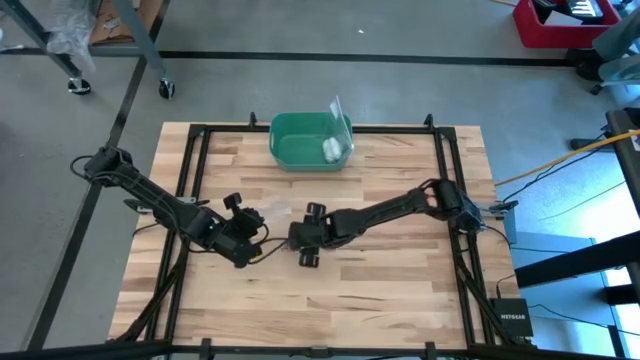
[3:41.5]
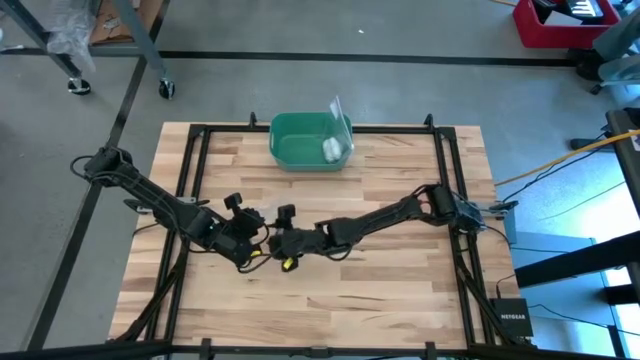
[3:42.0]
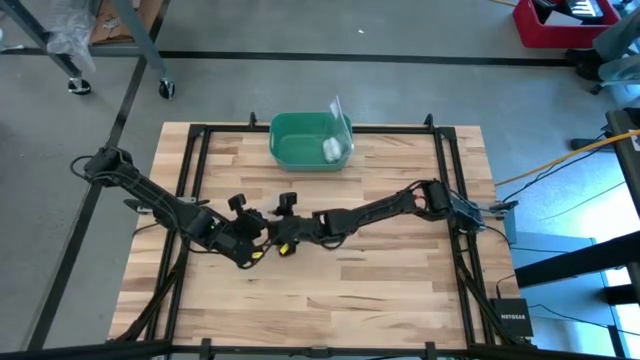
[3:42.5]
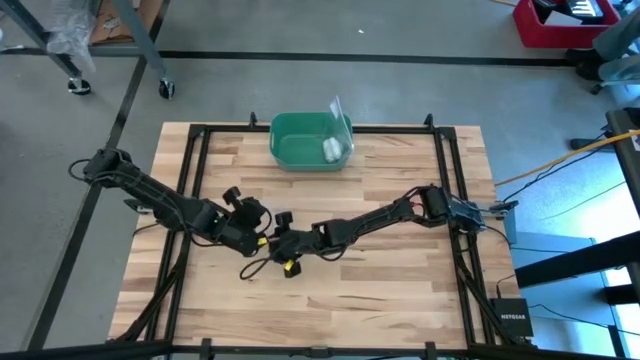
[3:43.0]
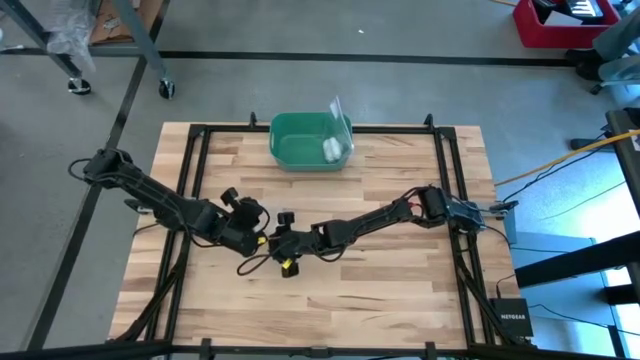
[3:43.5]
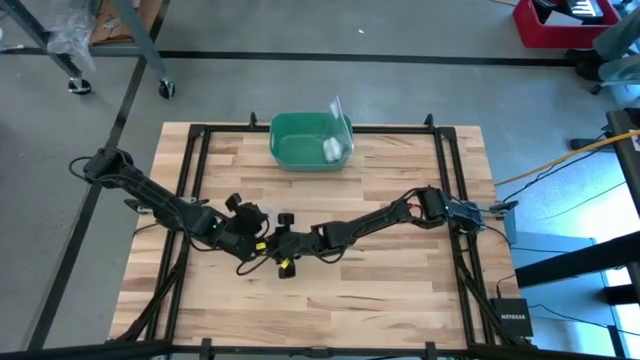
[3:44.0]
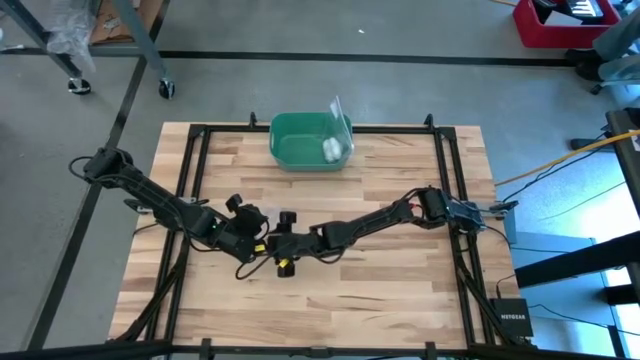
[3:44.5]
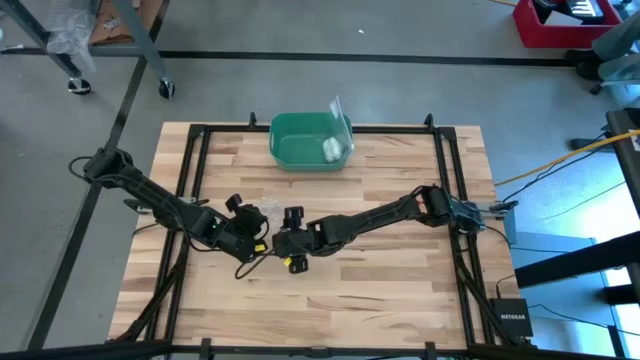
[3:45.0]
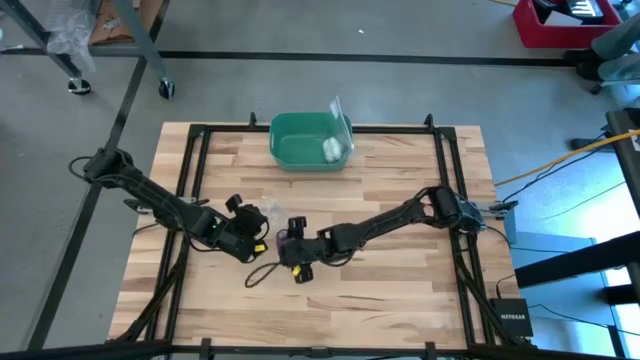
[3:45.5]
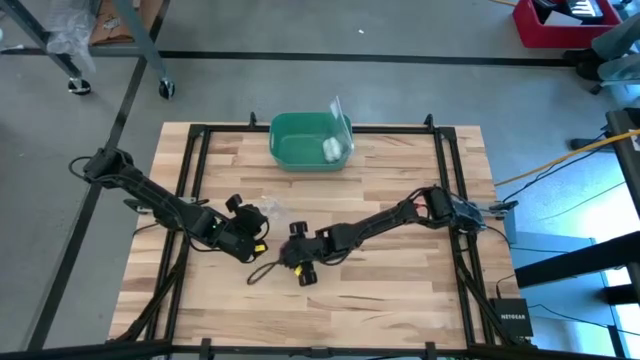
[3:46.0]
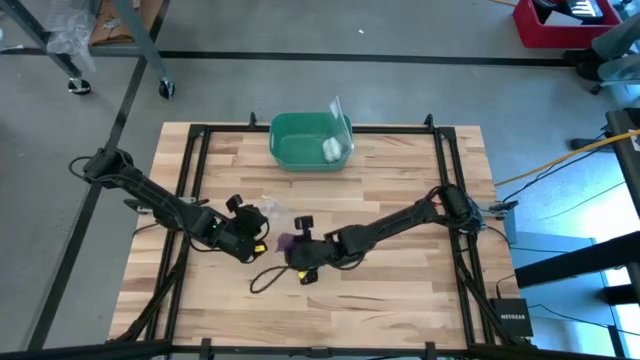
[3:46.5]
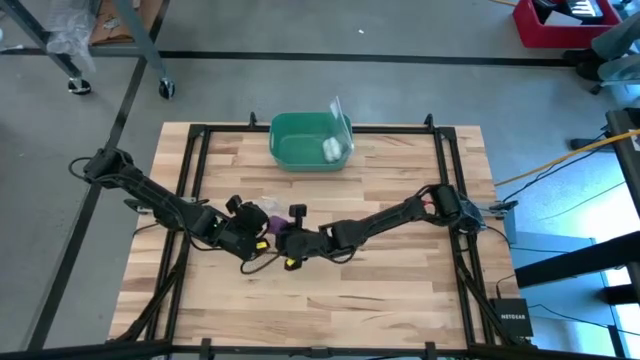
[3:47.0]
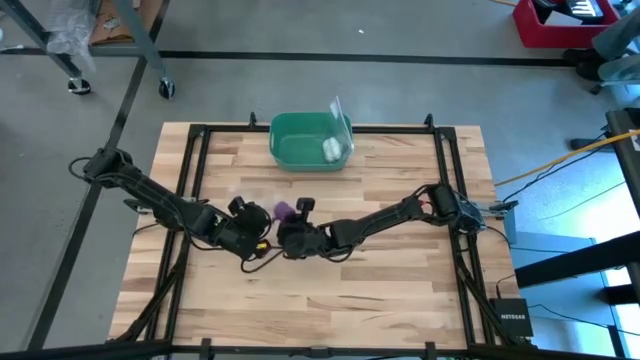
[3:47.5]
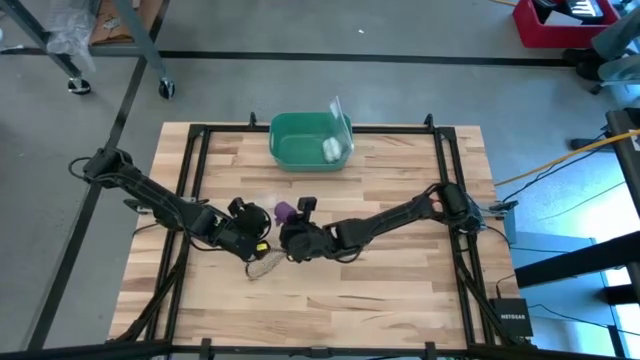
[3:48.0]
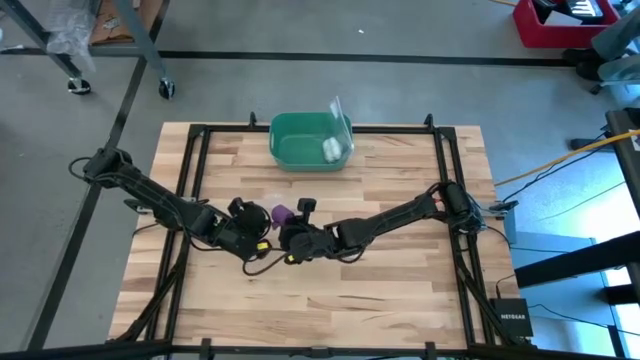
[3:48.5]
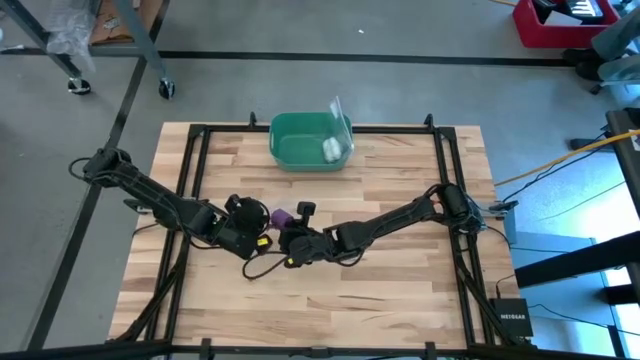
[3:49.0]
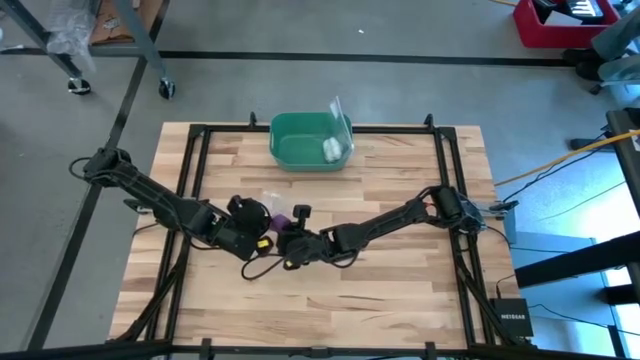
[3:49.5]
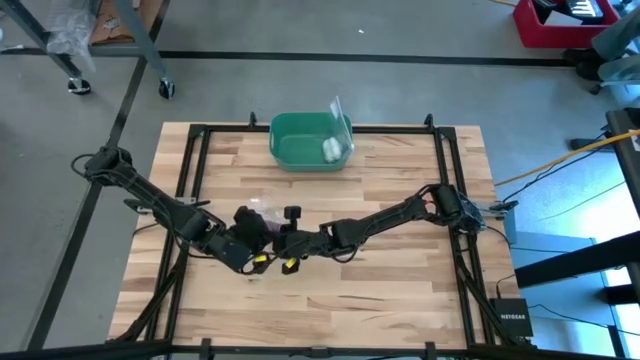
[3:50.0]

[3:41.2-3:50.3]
Task: Roll bandage
Put the violet bandage into the zip bag

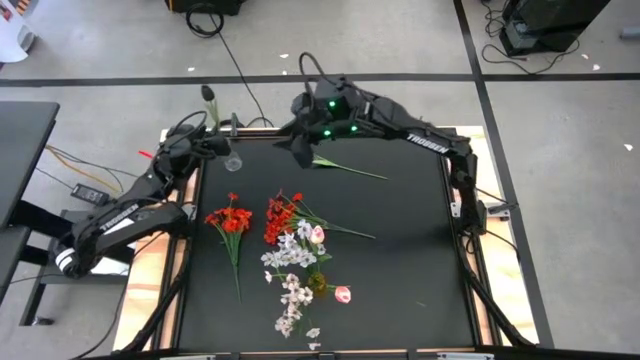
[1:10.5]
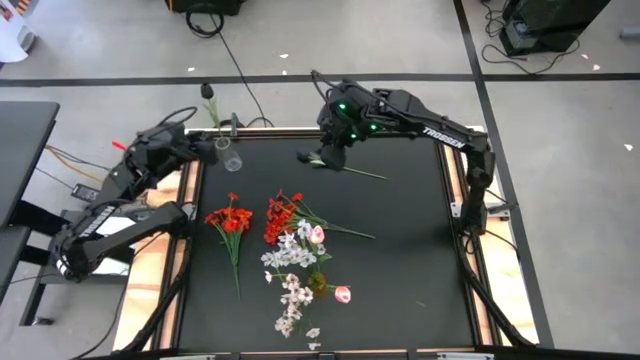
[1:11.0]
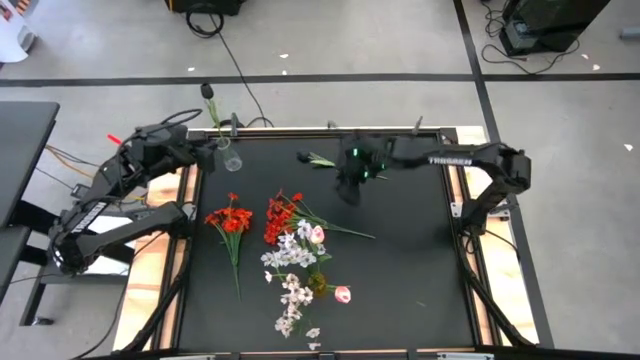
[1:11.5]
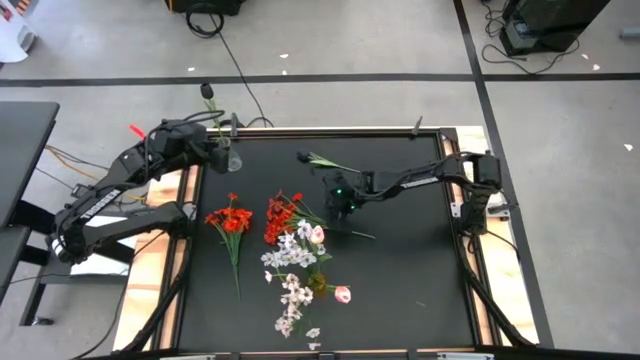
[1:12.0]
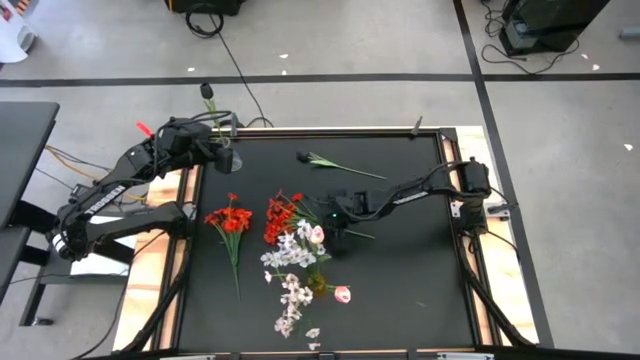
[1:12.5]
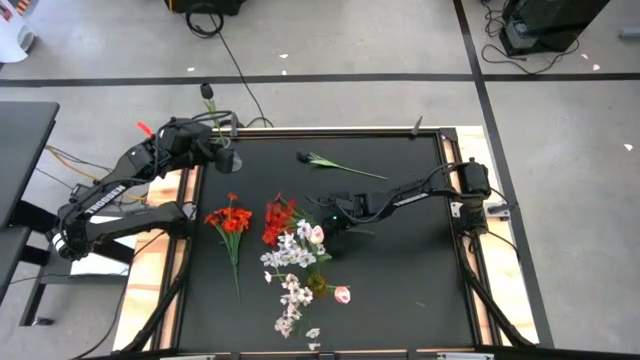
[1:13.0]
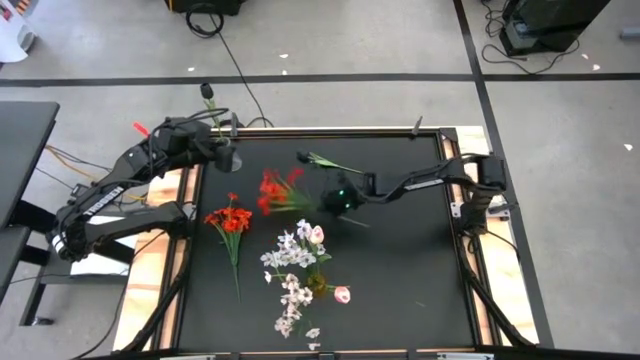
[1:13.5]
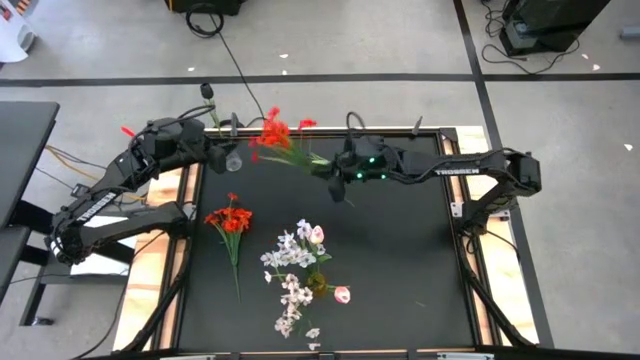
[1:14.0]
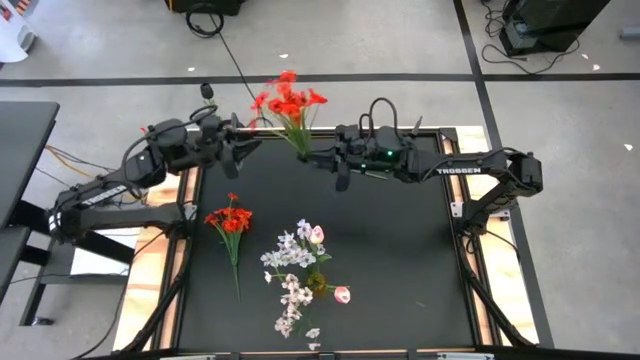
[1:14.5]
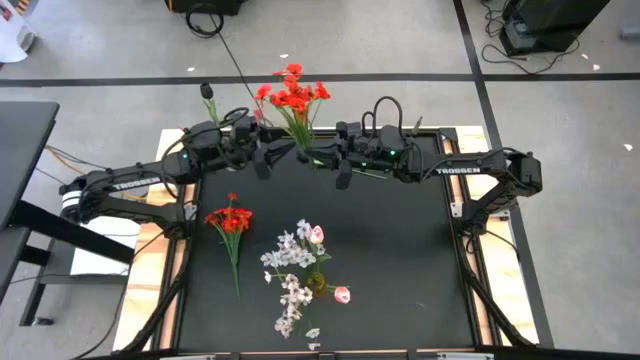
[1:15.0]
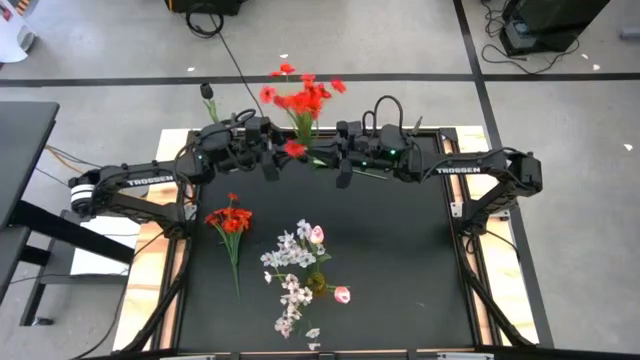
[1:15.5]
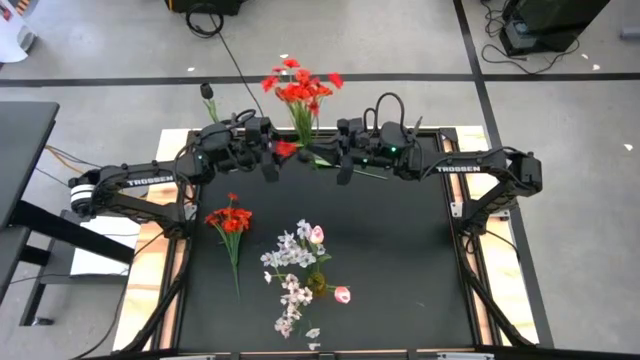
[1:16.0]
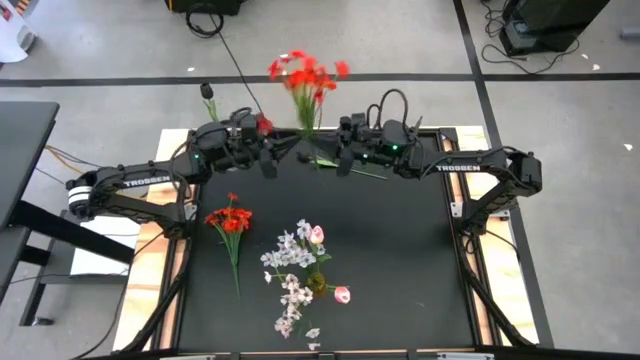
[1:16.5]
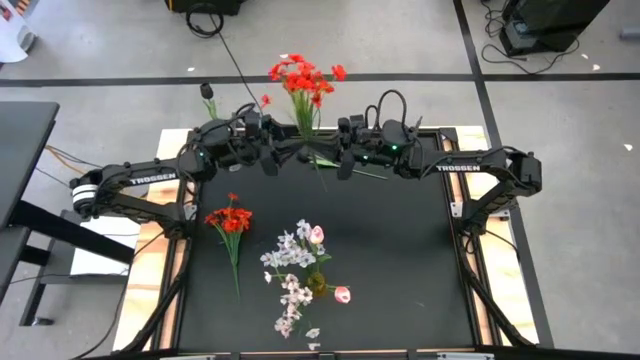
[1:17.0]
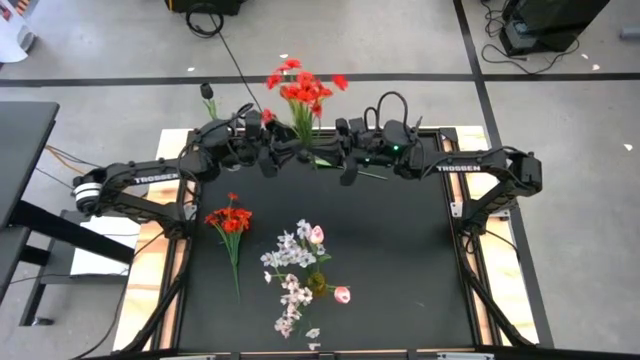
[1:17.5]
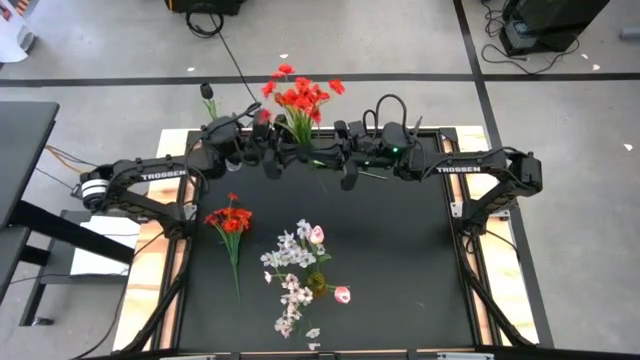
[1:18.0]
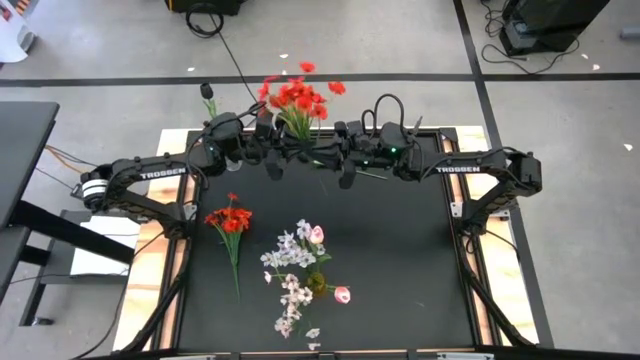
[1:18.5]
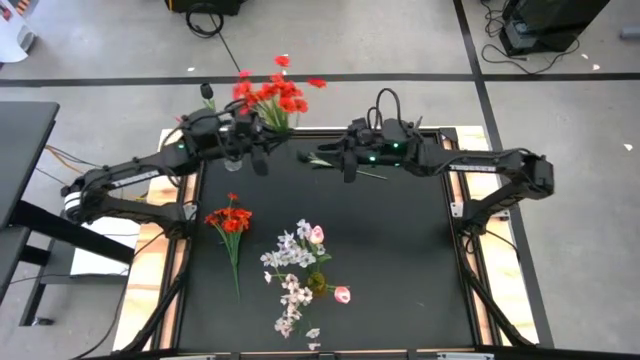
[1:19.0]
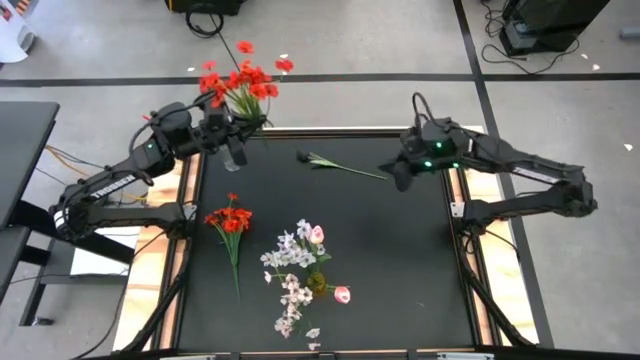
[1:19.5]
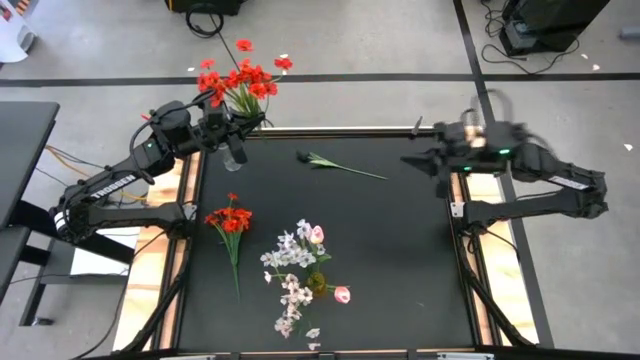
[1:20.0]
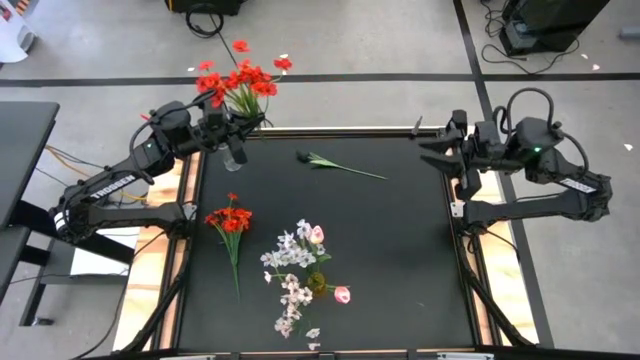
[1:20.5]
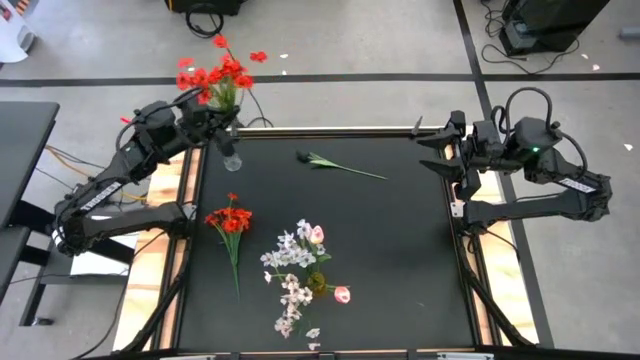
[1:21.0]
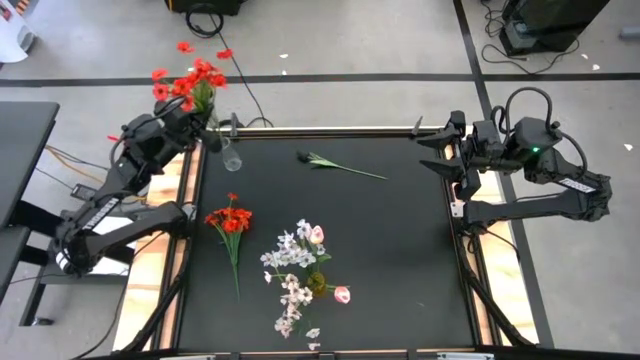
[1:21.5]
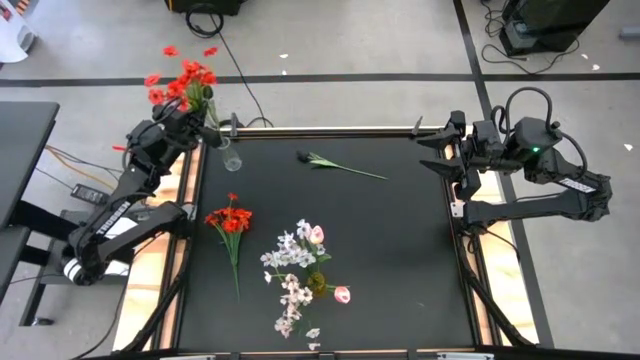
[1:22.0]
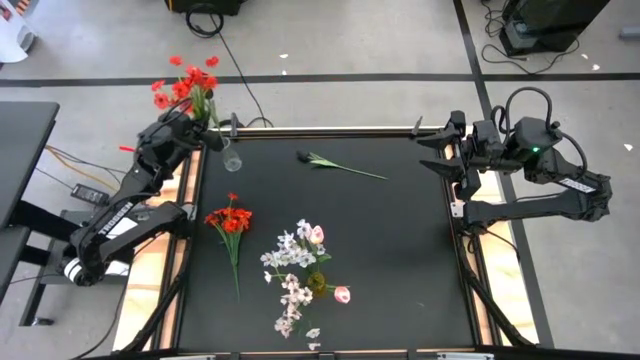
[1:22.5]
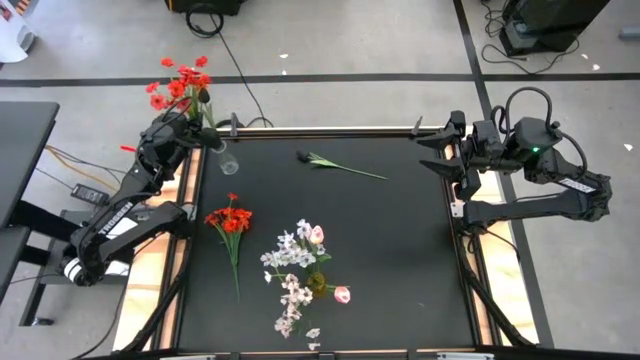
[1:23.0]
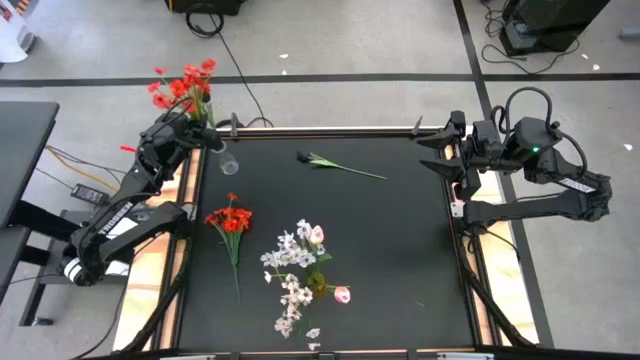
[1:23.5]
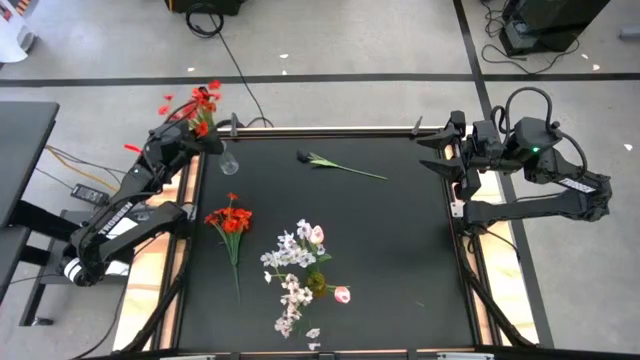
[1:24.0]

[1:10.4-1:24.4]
Task: Sort flowers into vase by color
Put the right orange flowers into the transparent vase
